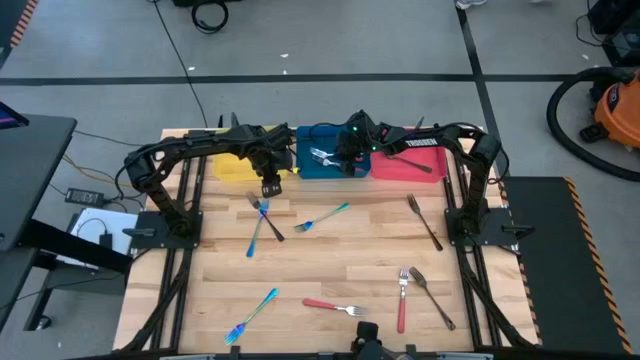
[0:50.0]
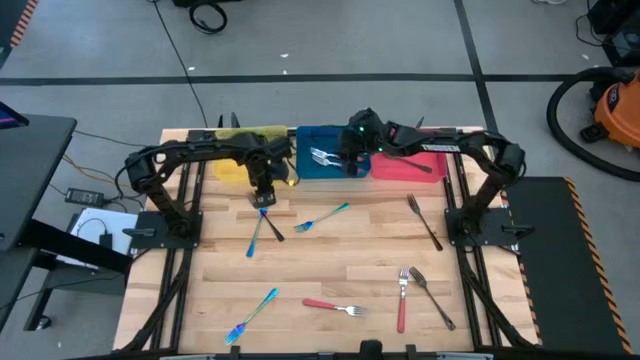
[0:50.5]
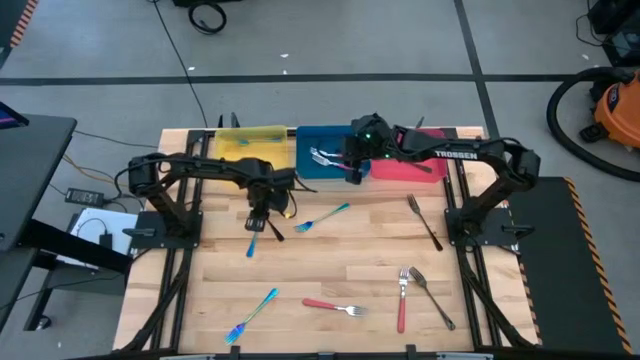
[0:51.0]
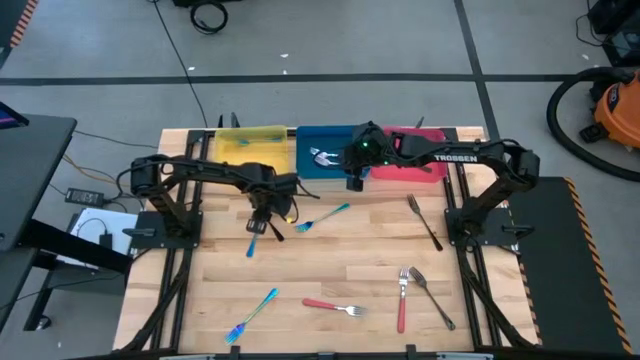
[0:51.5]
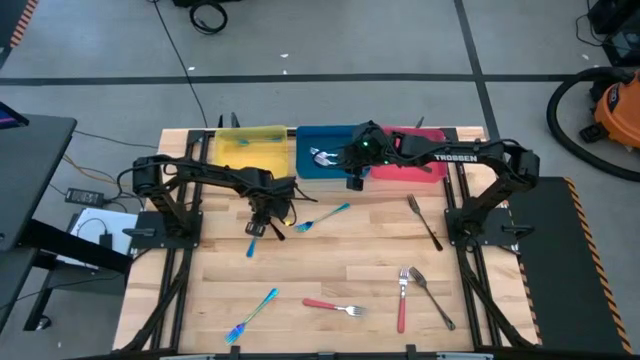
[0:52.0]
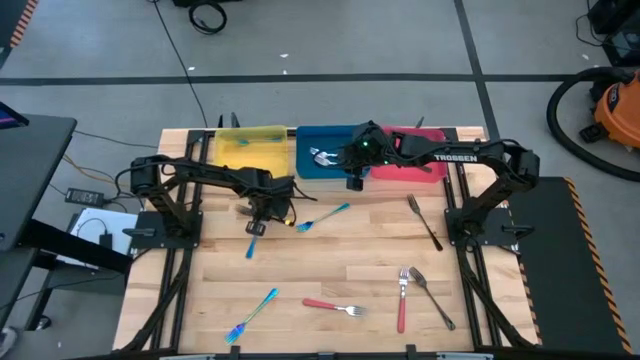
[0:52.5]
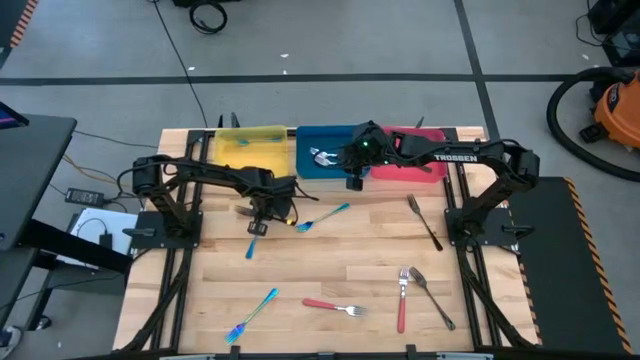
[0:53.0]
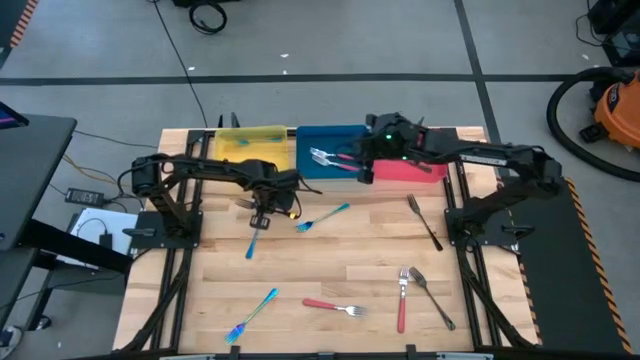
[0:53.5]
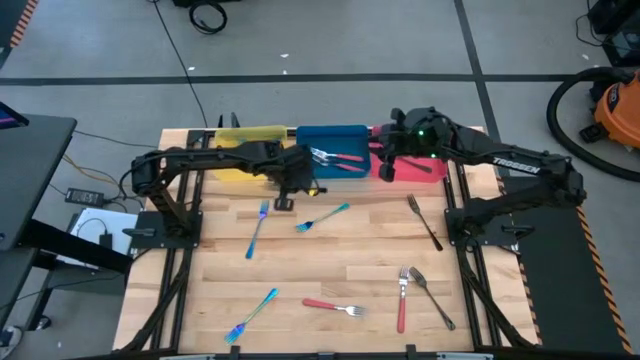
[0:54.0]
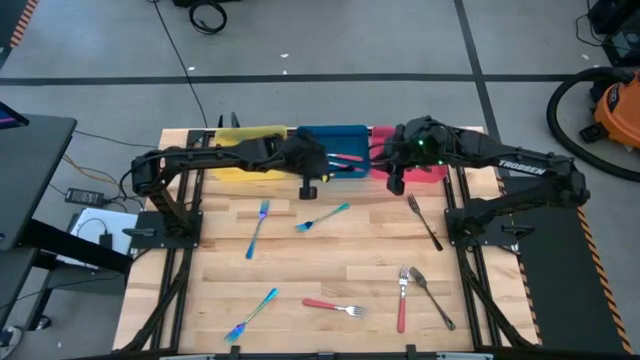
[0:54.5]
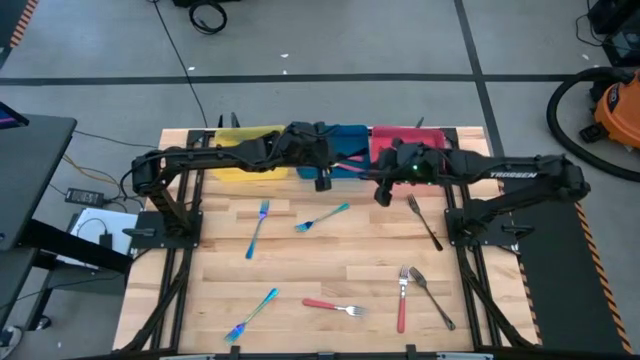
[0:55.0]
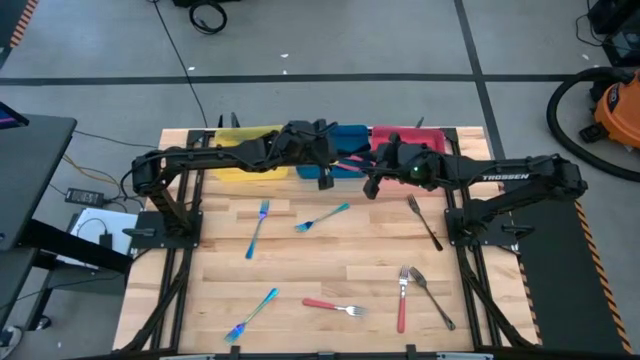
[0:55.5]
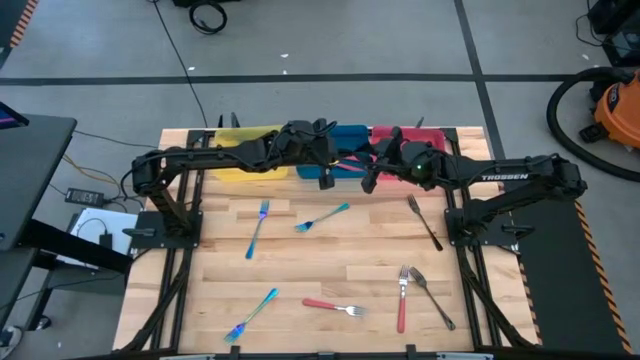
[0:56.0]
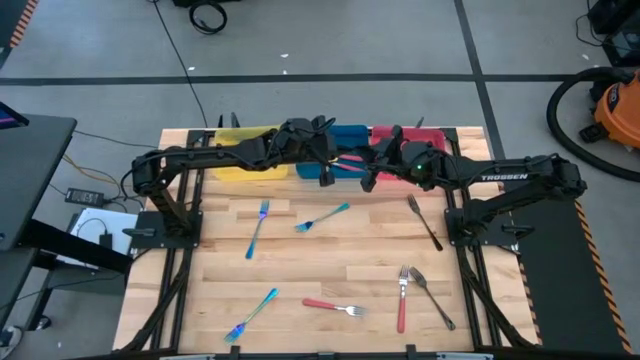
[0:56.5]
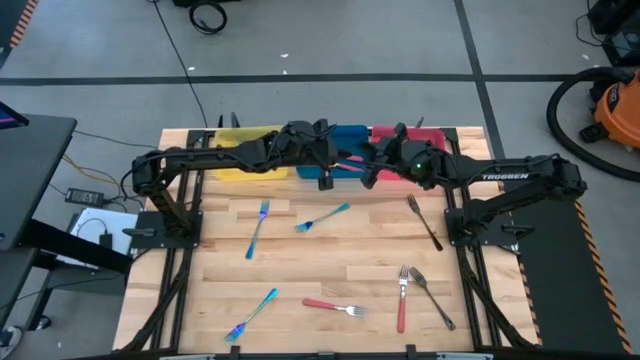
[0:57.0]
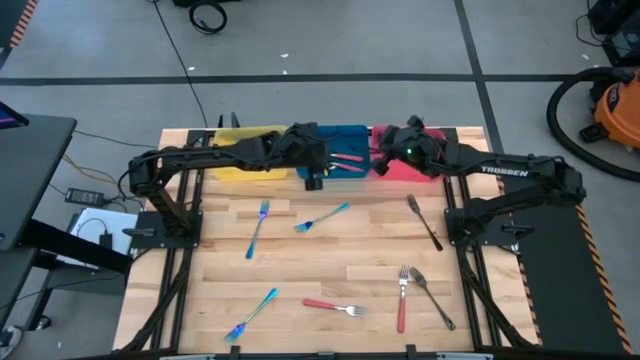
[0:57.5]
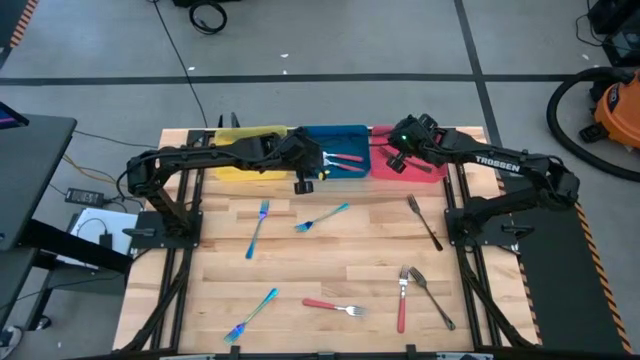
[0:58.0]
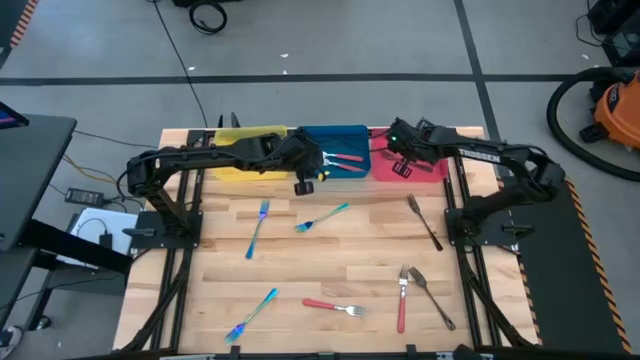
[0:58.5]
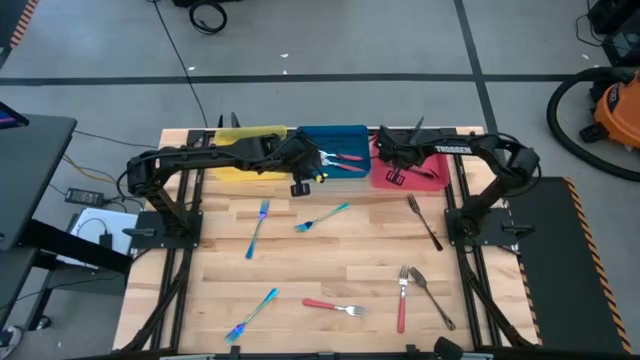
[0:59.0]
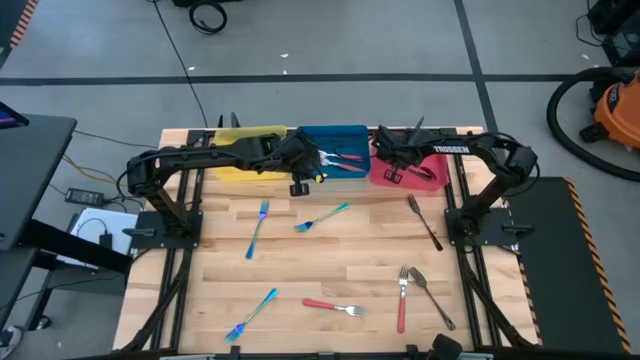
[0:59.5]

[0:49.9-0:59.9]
Task: Sort silverware by color (type)
Put the black fork into the pink bin

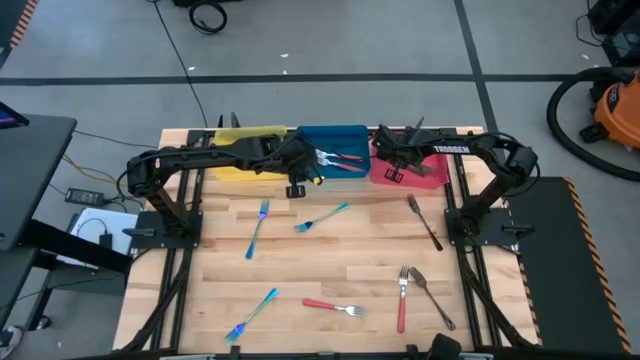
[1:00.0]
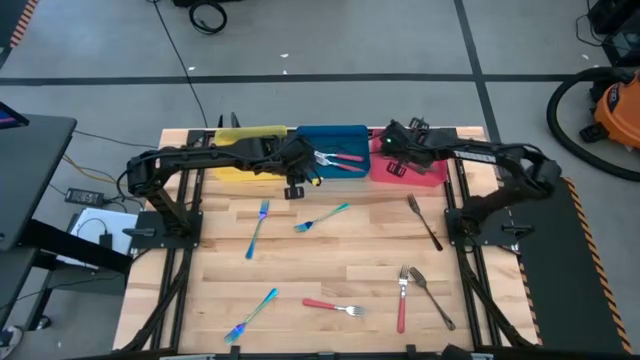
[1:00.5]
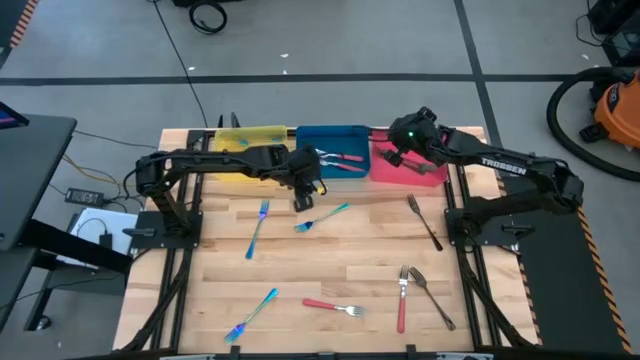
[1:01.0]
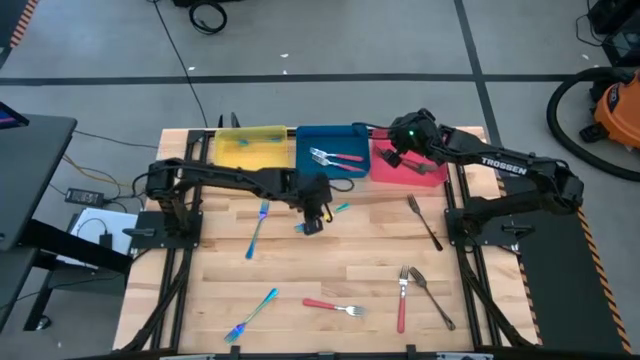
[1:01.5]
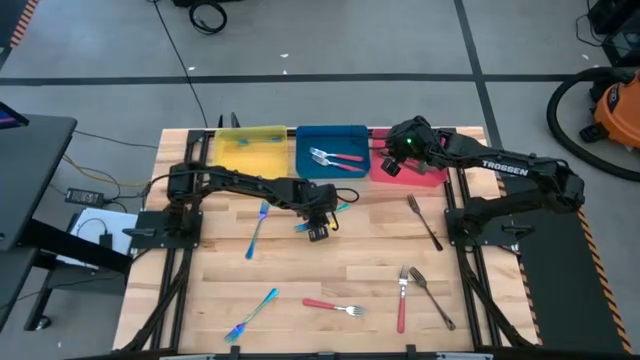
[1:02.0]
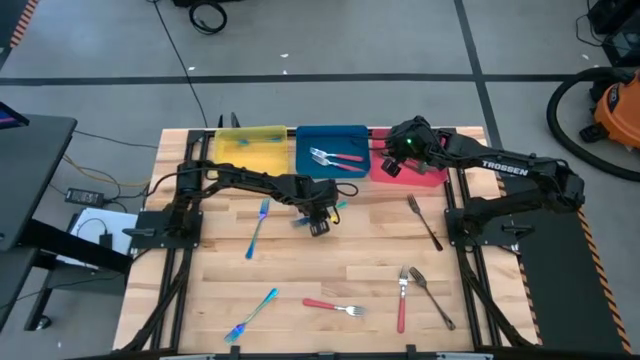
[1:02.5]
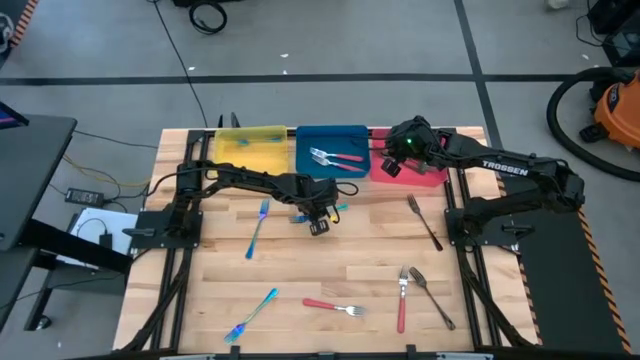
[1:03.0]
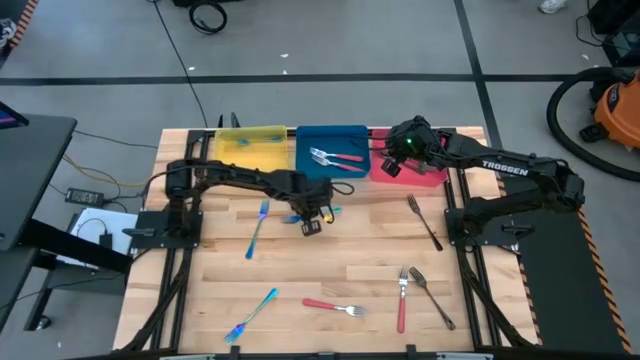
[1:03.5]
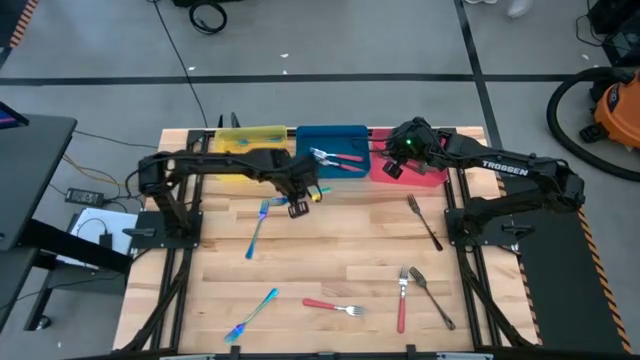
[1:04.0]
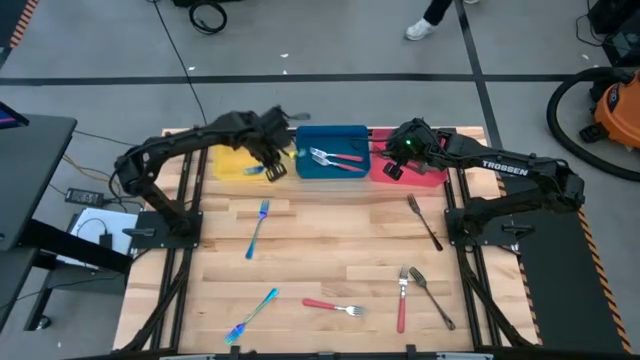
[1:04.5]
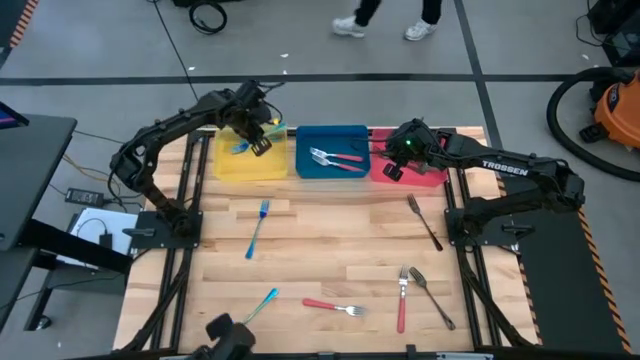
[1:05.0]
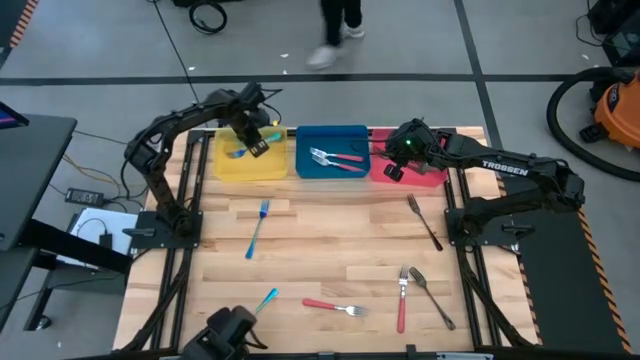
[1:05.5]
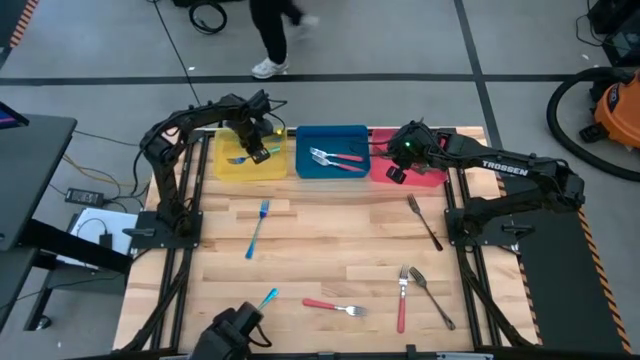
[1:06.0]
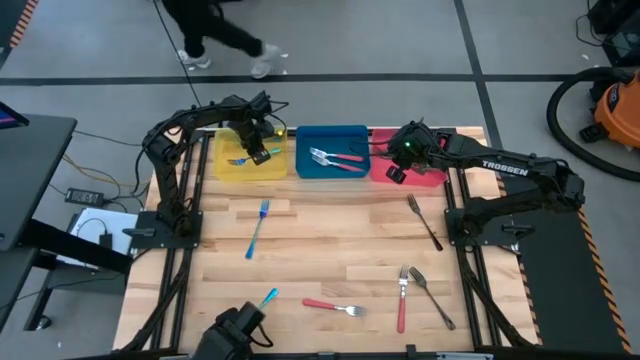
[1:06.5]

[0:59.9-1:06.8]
Put the blue fork into the yellow bin

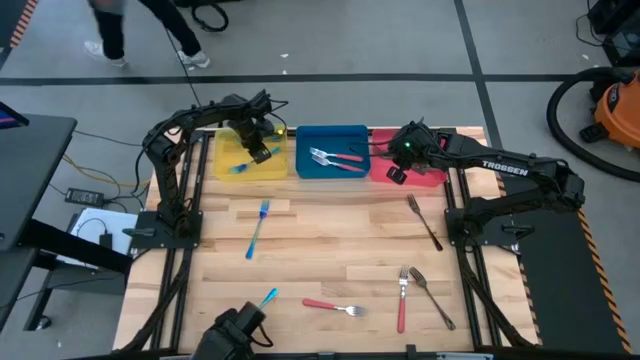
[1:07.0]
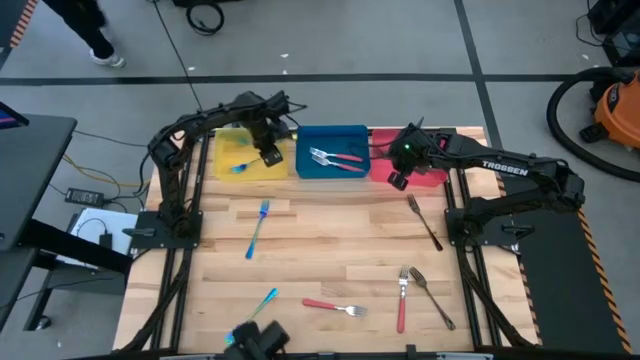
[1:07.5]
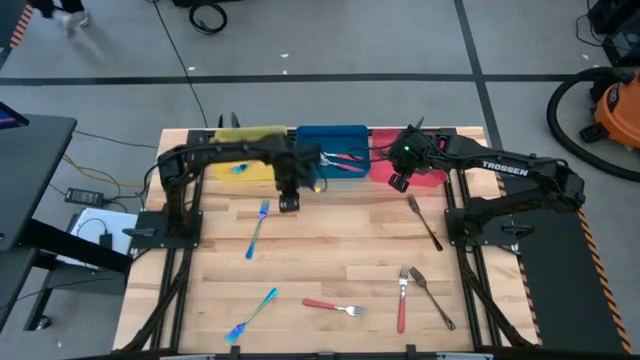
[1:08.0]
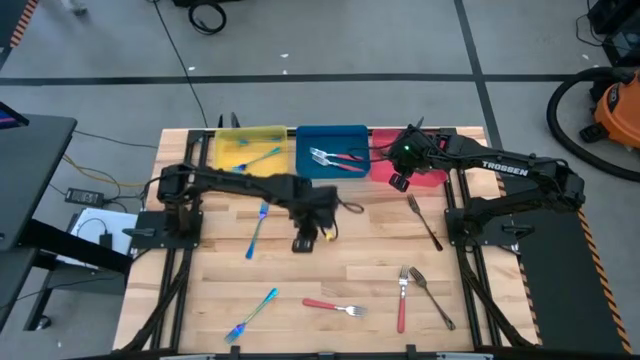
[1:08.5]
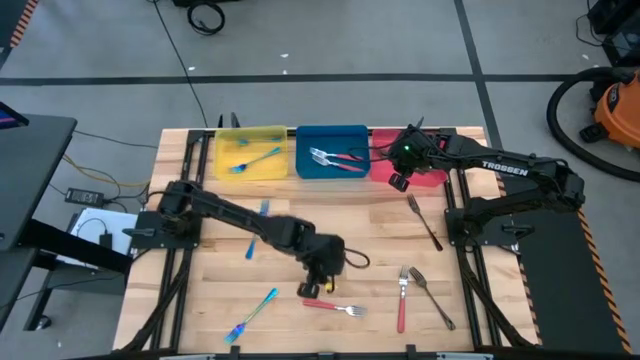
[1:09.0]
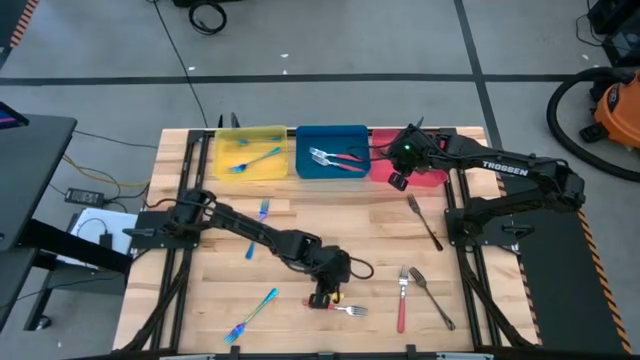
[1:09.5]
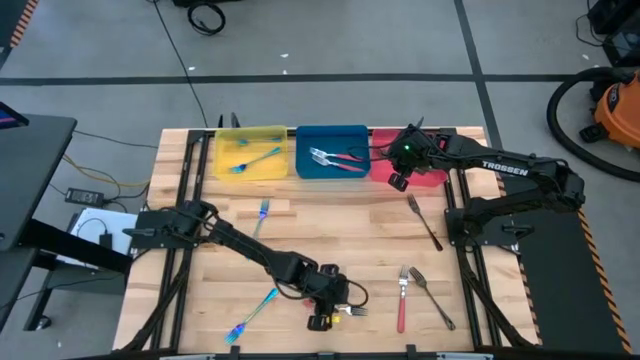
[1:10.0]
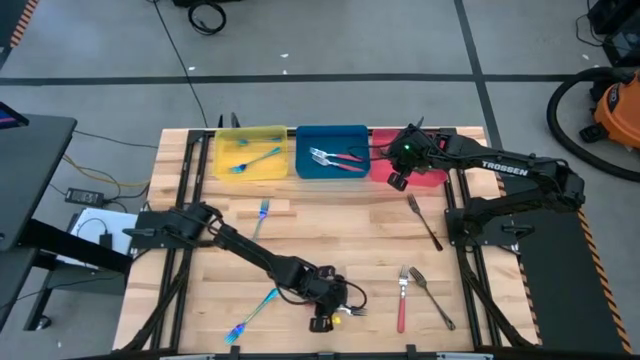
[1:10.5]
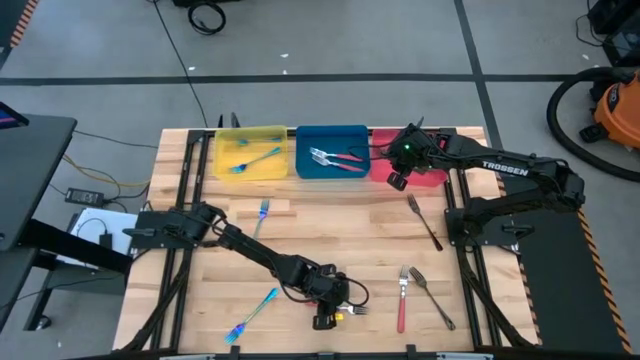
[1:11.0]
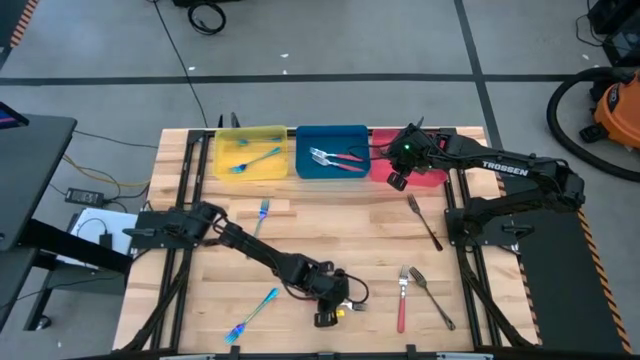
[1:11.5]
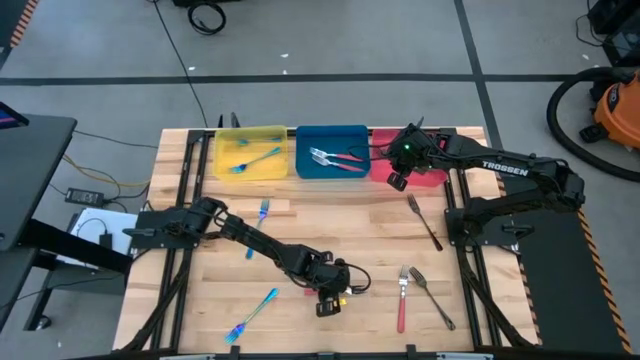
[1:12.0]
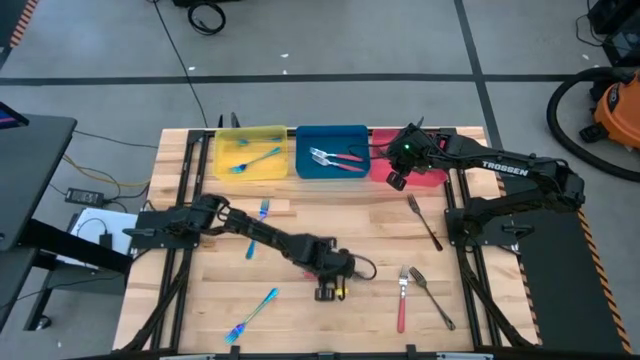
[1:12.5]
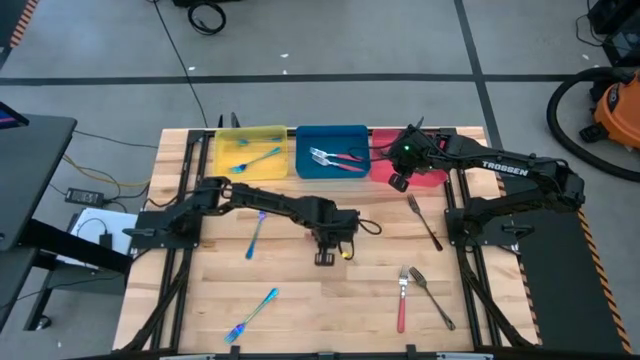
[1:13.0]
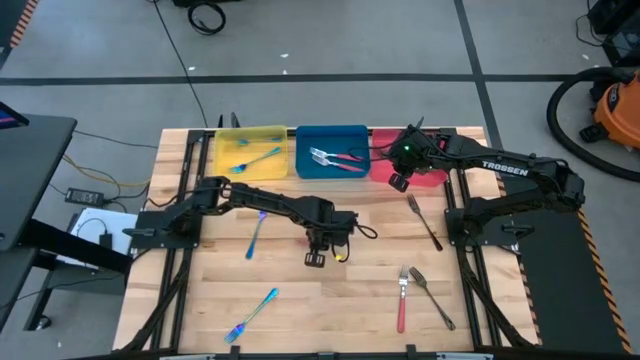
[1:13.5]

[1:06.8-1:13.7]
Put the pink fork into the blue bin
